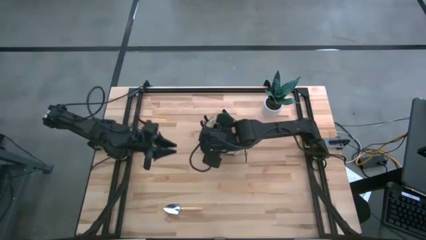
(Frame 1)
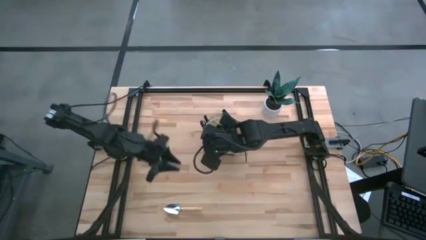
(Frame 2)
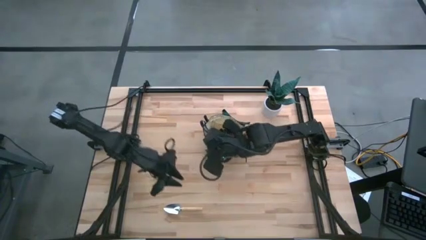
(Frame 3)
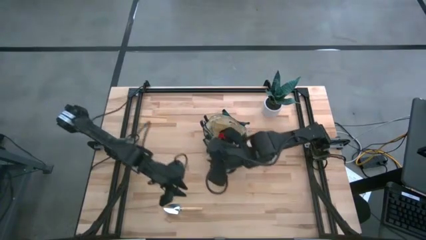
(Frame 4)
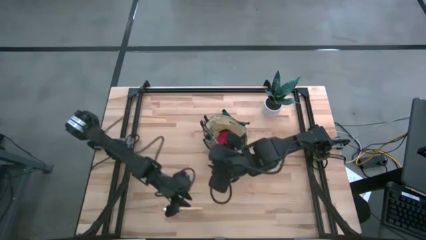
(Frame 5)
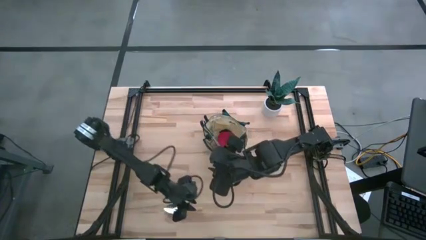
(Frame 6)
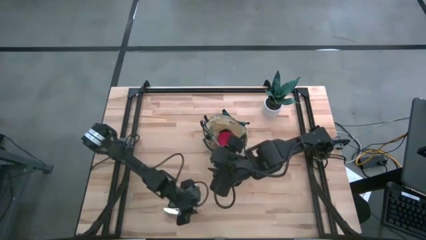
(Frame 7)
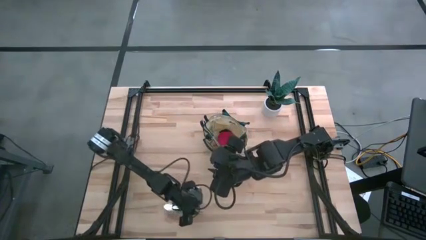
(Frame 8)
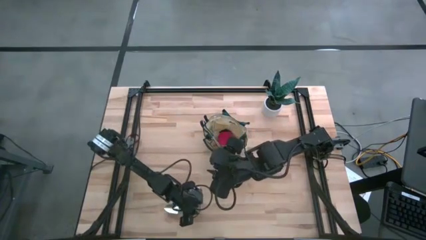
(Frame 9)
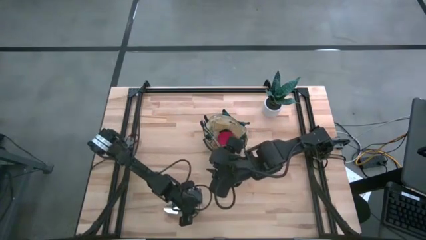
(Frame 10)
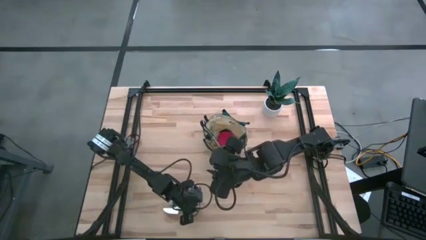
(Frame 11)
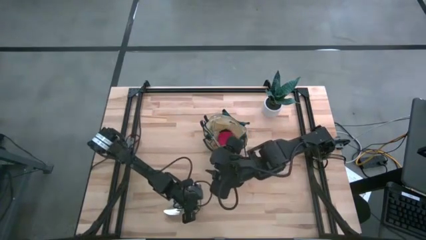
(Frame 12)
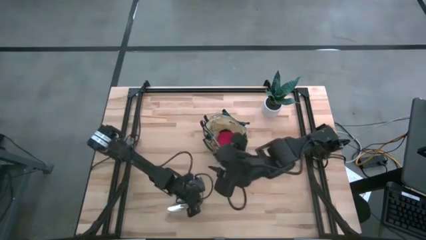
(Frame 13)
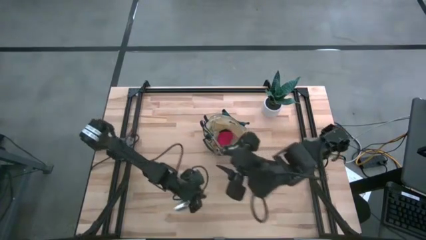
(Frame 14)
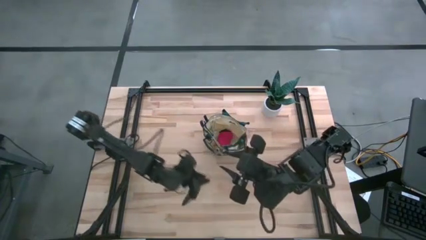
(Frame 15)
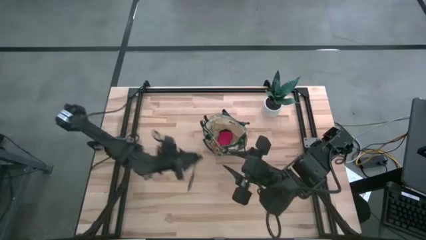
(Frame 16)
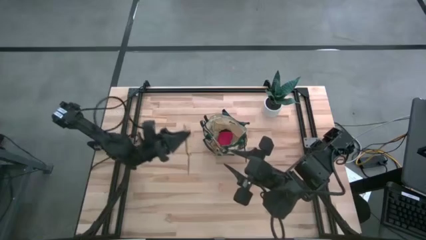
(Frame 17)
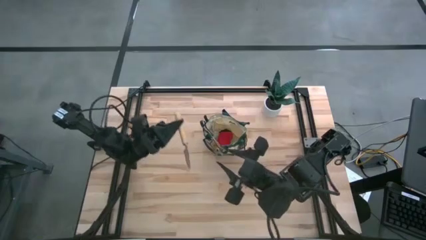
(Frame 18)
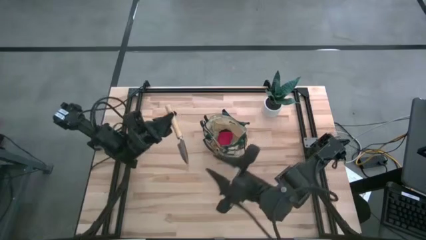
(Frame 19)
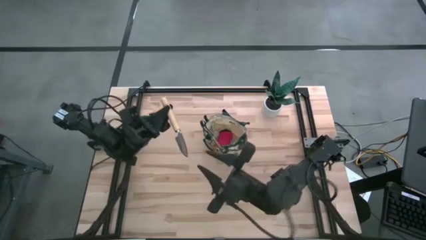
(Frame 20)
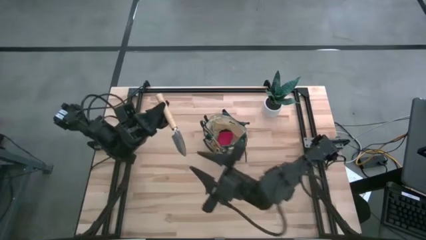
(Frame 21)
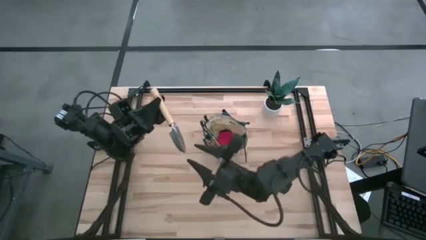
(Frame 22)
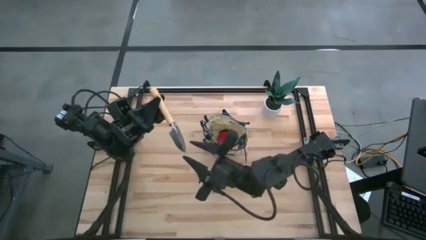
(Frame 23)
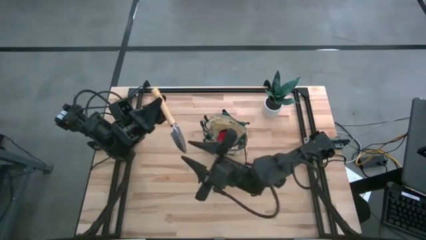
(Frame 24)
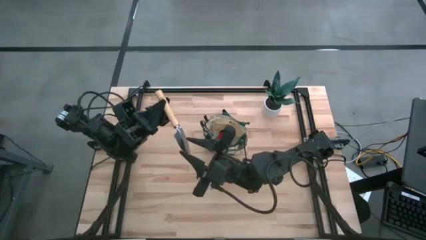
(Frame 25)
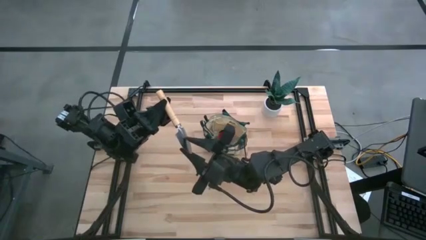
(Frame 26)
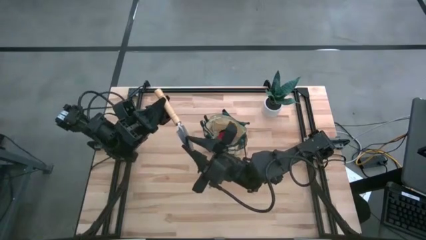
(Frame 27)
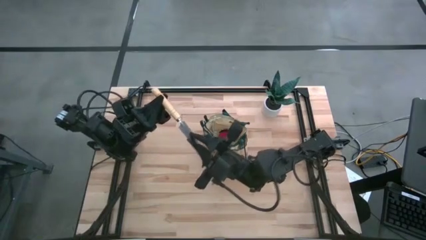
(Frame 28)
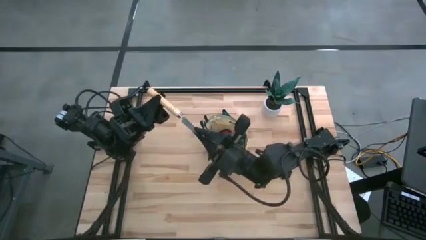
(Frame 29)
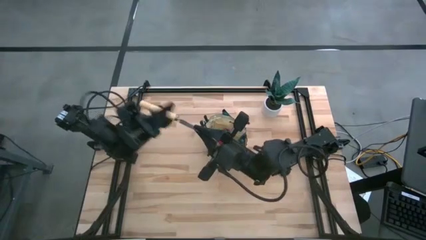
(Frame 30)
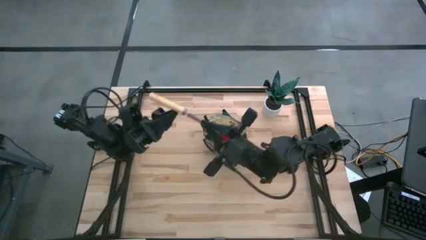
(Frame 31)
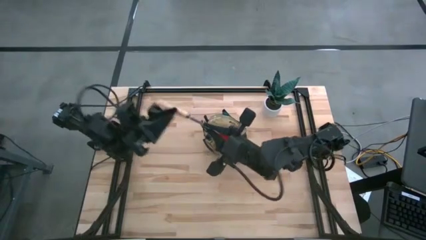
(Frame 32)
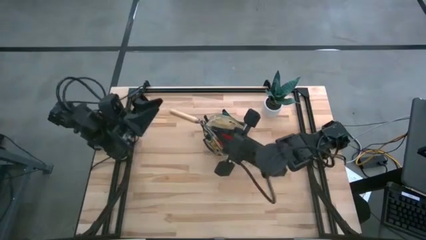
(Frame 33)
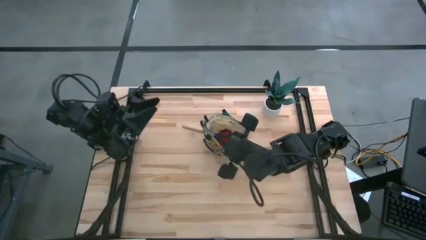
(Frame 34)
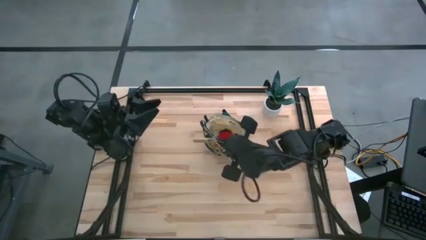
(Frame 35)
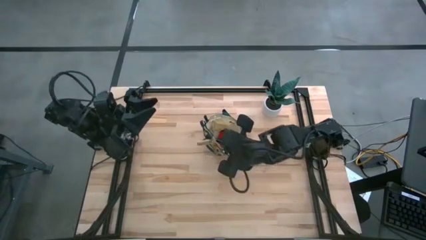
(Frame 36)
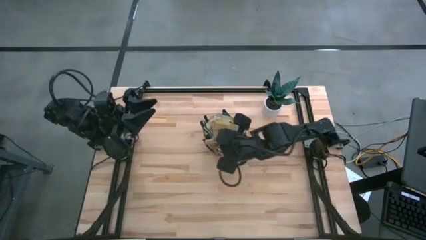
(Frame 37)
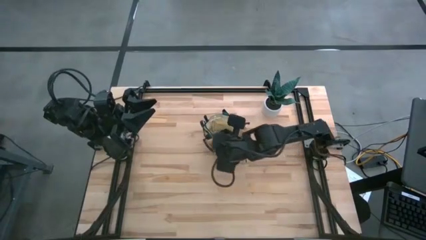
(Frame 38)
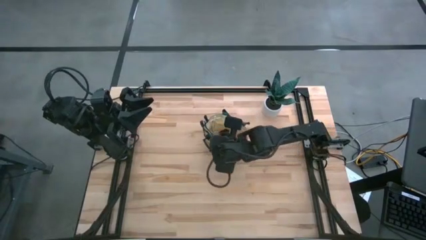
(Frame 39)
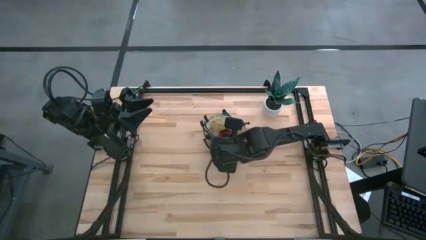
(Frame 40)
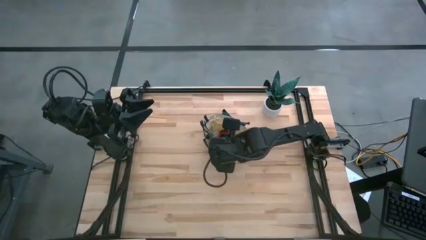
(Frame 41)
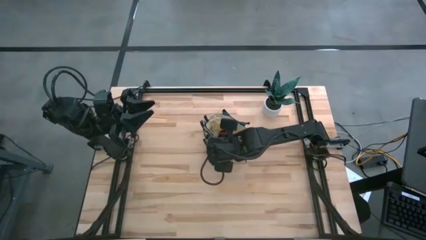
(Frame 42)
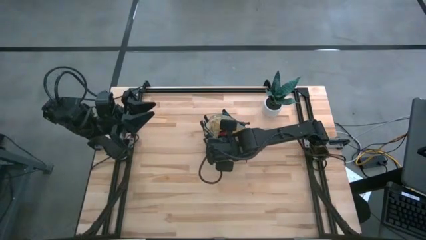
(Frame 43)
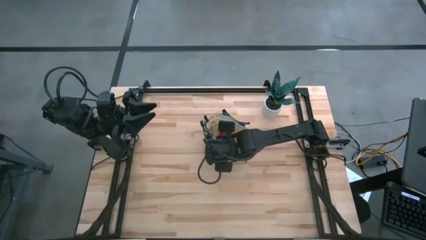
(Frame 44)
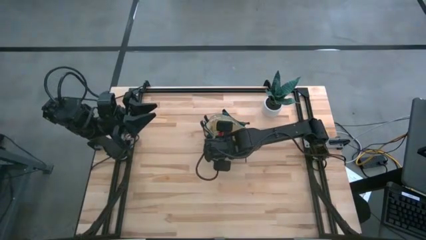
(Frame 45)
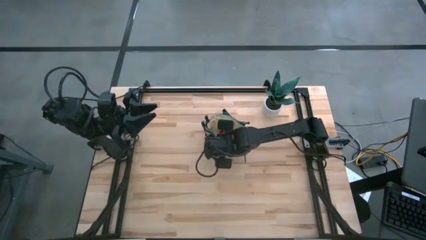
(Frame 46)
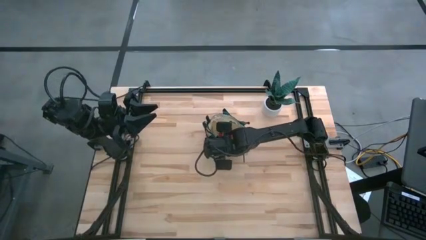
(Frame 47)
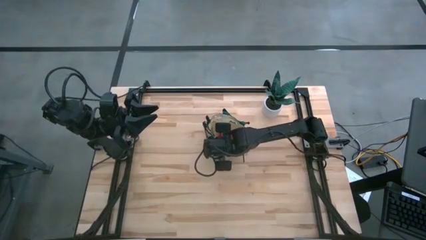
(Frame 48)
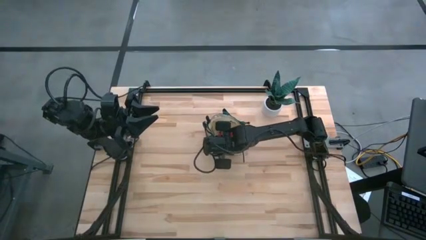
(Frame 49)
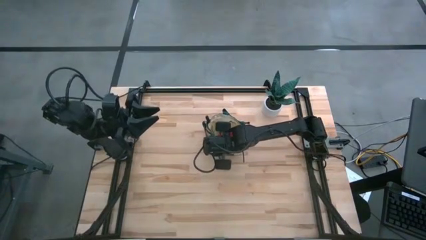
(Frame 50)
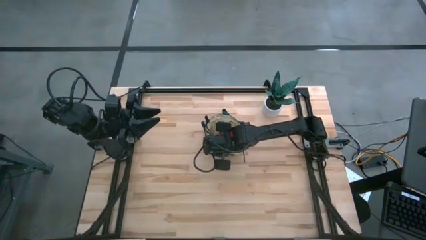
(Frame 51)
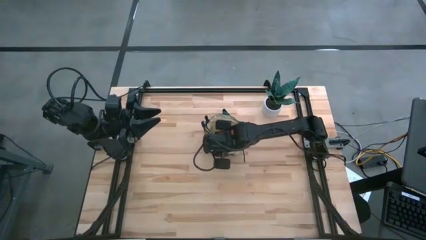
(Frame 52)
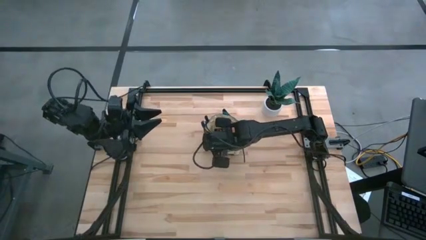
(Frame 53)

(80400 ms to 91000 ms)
Task: Pick & Place Garden tools in Gardening bag
Put the trowel into the front bag pocket with the other trowel

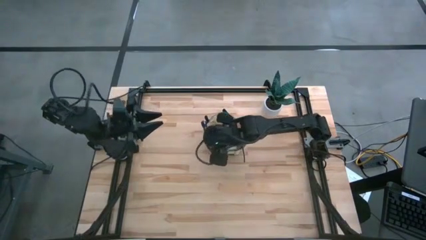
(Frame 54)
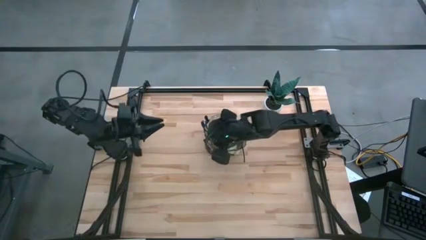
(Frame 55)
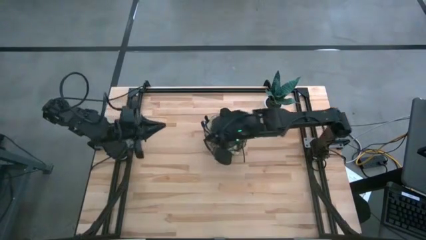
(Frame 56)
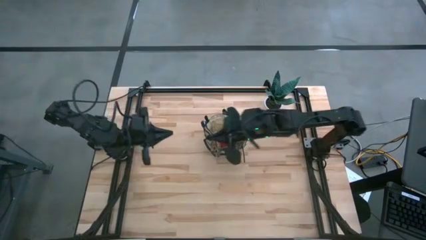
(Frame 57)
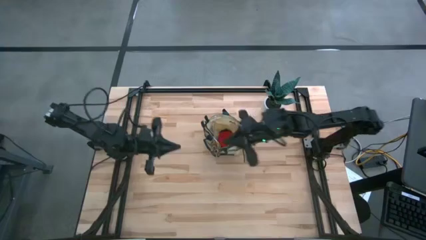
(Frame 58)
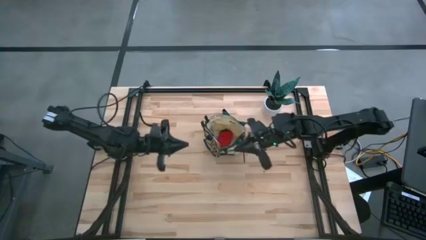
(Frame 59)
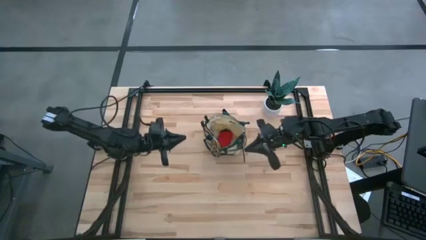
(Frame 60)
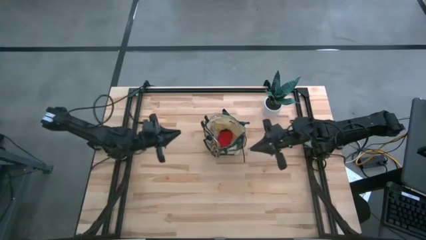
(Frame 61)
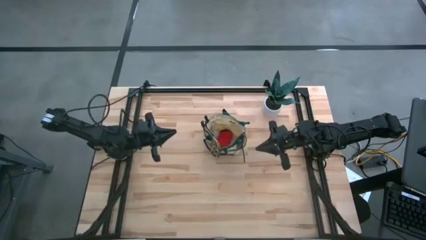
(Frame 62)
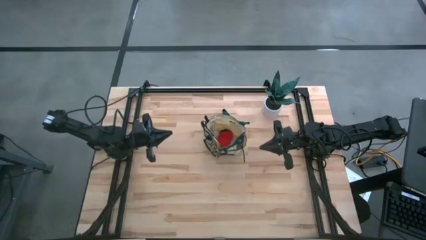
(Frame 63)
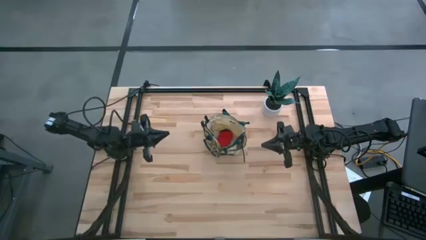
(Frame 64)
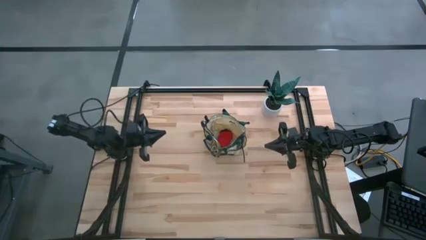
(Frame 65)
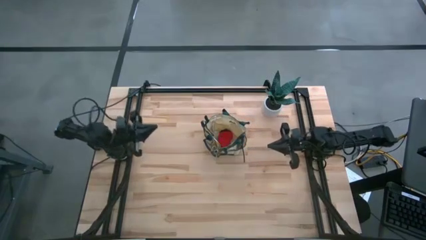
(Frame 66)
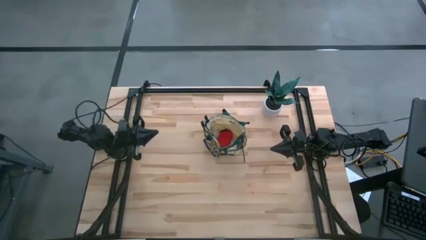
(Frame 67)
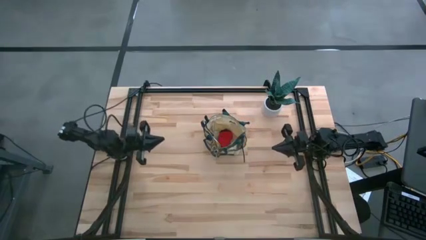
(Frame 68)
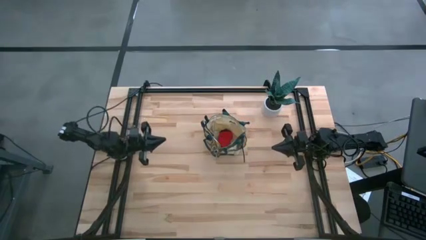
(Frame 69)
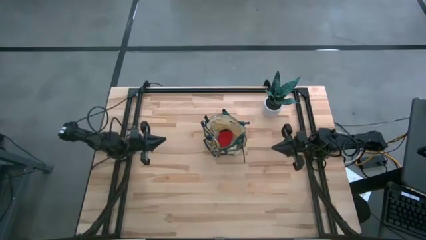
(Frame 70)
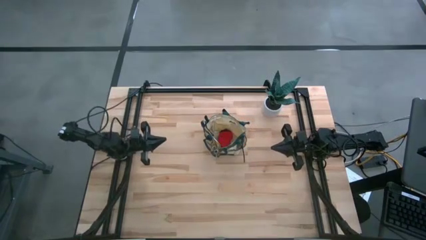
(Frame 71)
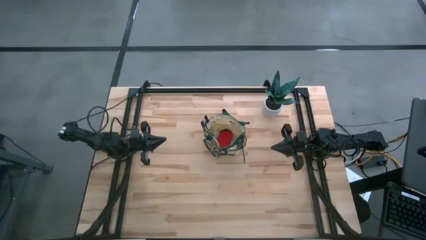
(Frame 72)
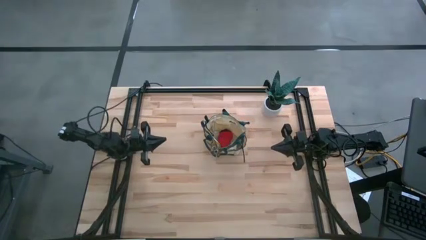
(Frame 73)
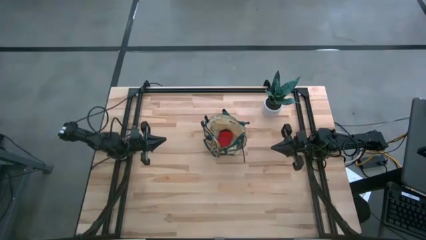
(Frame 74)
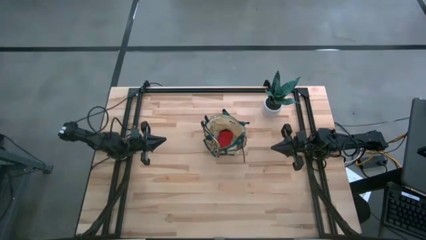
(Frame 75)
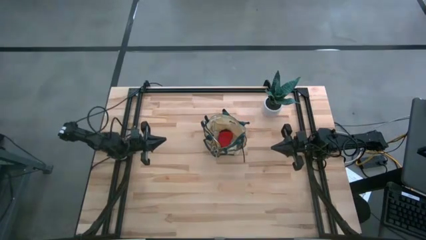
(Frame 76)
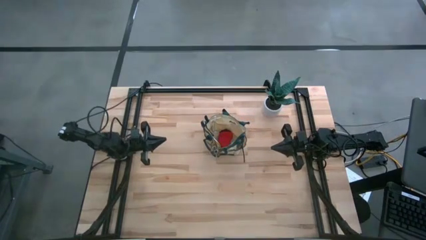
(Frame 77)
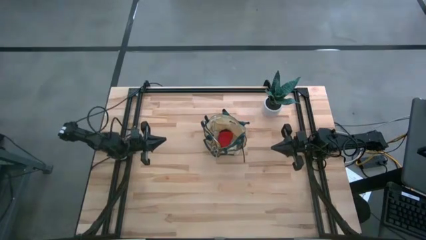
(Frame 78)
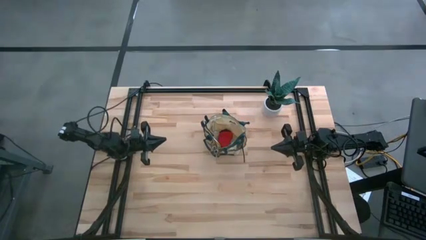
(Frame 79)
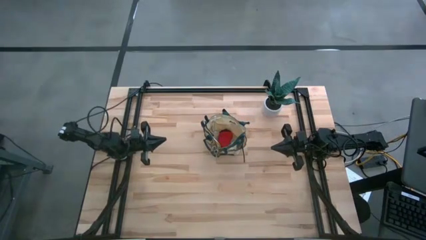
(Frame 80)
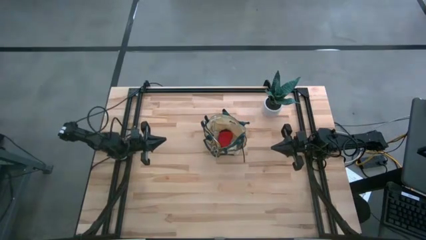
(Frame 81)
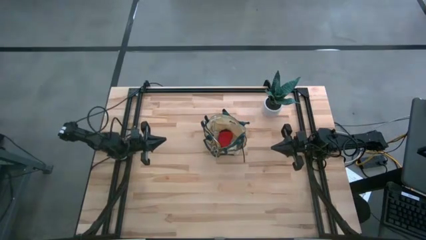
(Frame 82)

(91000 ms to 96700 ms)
Return to Home Position

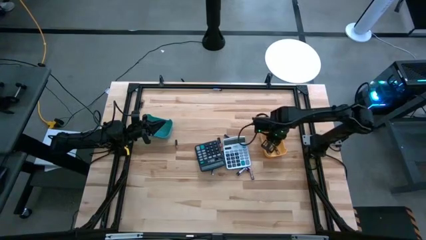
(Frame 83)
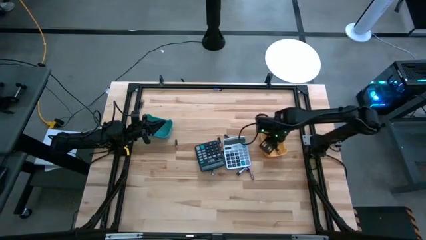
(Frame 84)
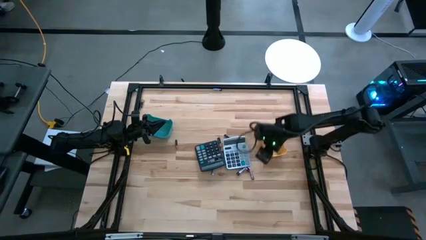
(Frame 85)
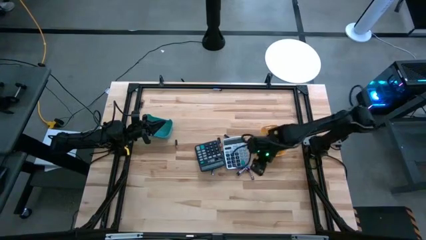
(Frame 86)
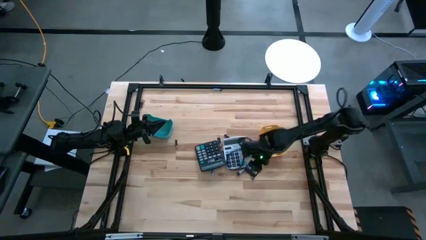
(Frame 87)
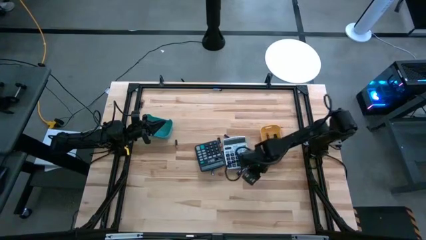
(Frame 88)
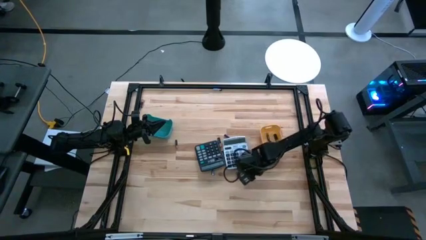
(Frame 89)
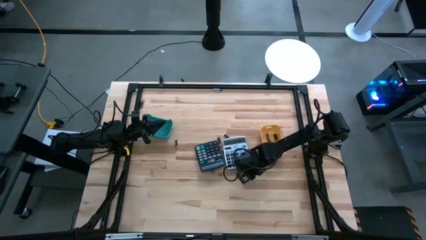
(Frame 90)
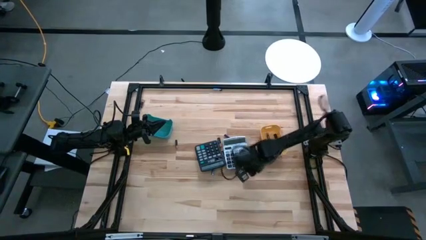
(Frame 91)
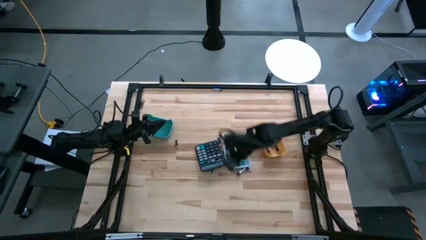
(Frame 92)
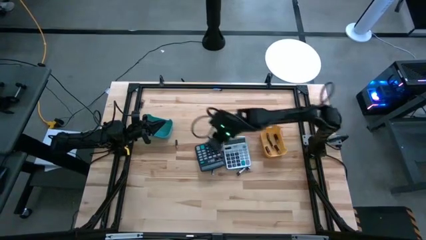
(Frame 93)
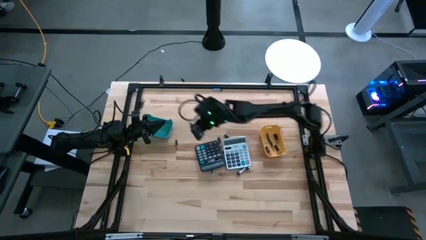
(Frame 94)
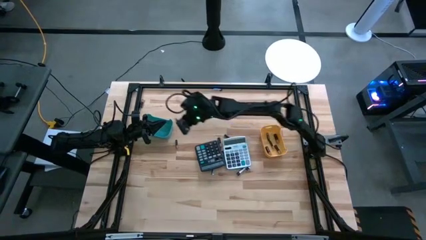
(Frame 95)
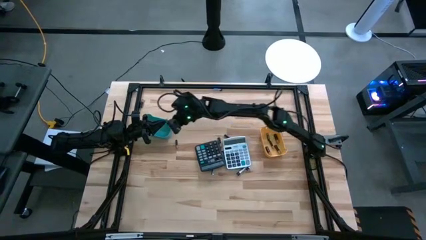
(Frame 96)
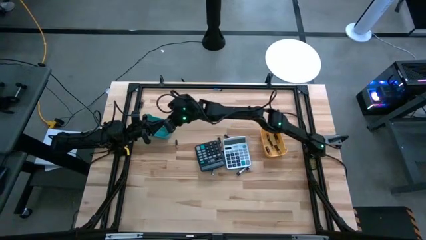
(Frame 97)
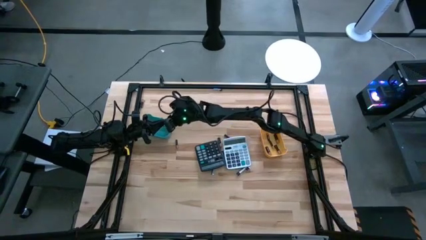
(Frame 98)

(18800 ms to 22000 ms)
Task: Sort batteries
Put the silver battery into the blue bin
